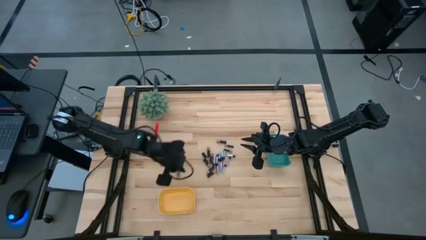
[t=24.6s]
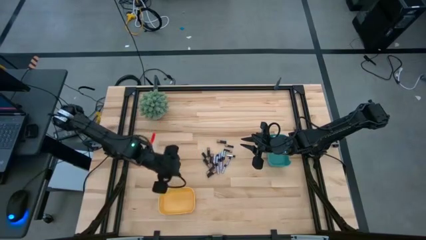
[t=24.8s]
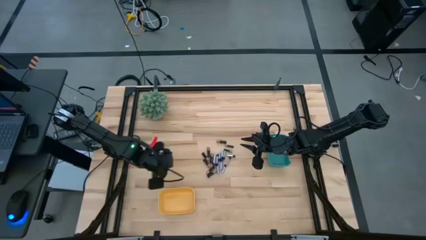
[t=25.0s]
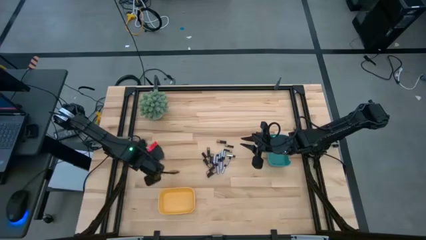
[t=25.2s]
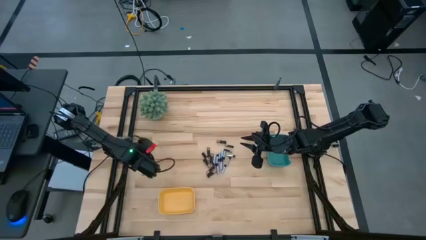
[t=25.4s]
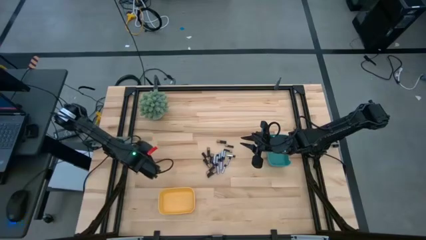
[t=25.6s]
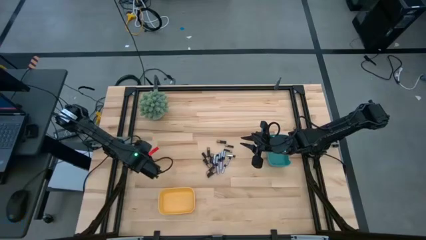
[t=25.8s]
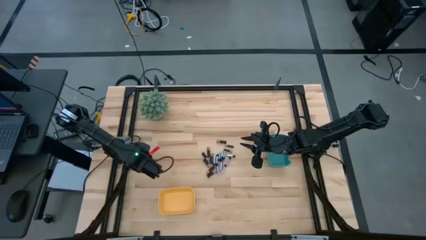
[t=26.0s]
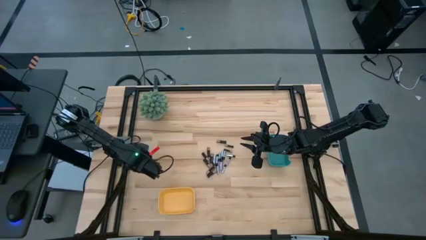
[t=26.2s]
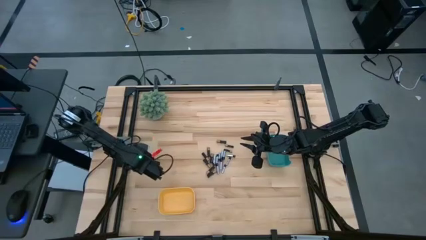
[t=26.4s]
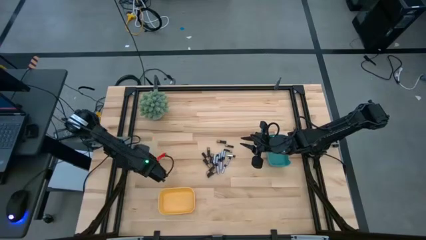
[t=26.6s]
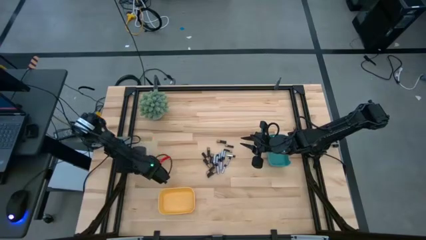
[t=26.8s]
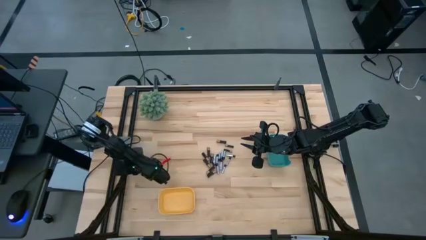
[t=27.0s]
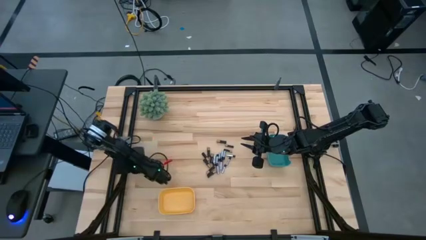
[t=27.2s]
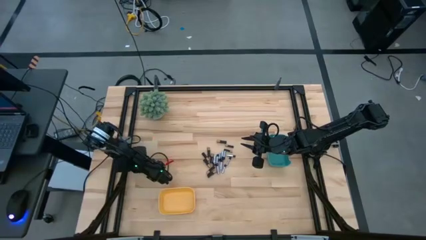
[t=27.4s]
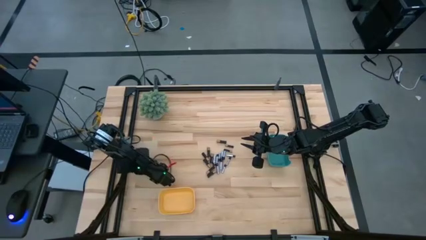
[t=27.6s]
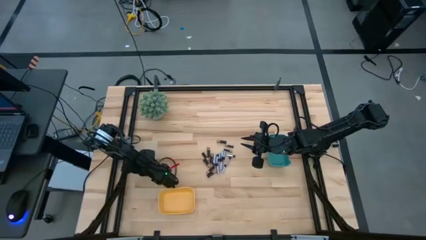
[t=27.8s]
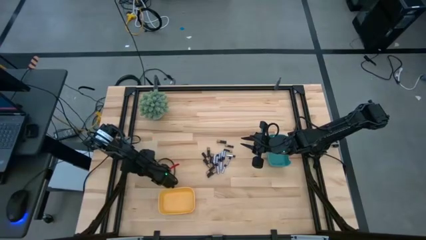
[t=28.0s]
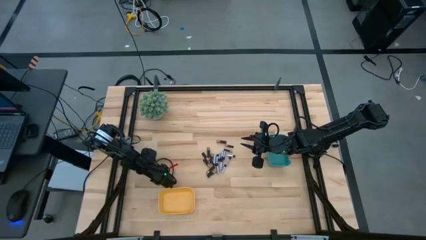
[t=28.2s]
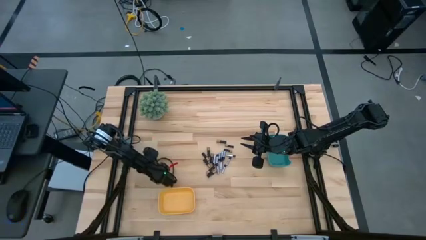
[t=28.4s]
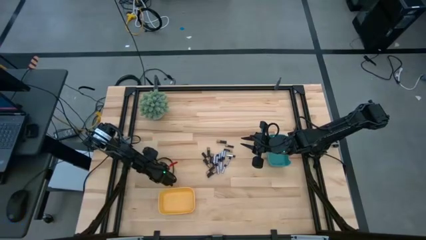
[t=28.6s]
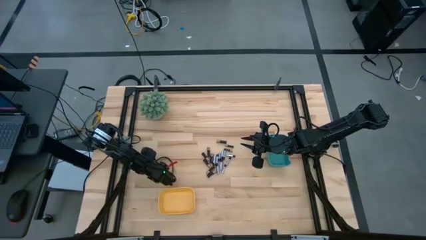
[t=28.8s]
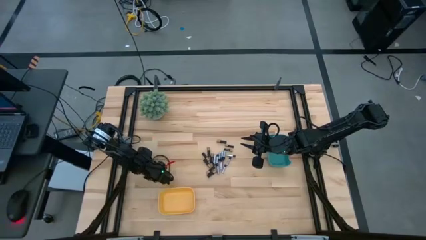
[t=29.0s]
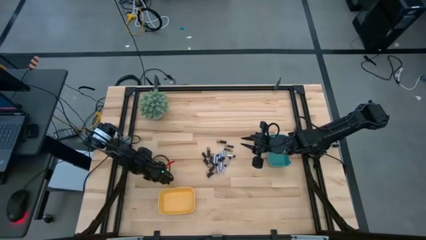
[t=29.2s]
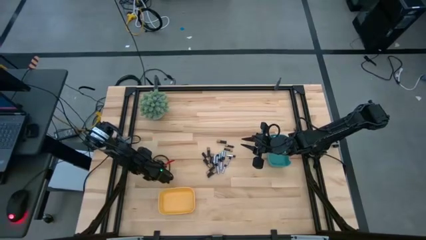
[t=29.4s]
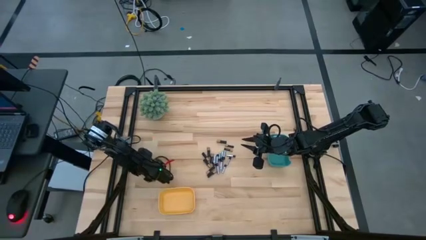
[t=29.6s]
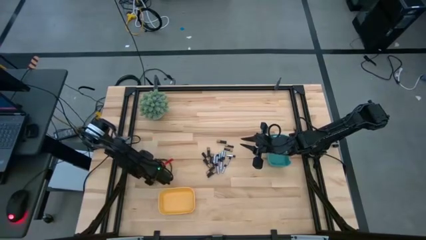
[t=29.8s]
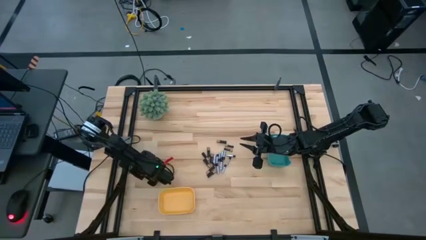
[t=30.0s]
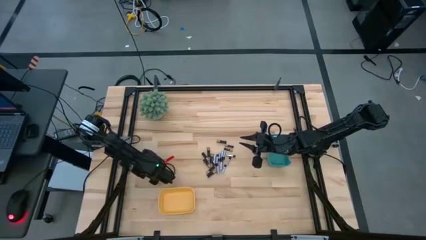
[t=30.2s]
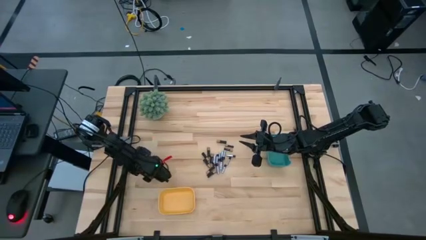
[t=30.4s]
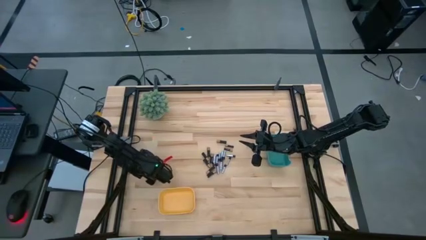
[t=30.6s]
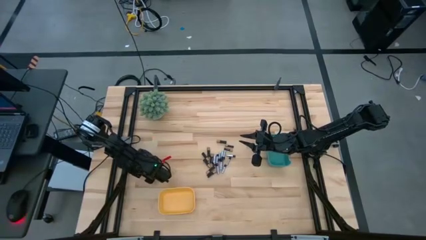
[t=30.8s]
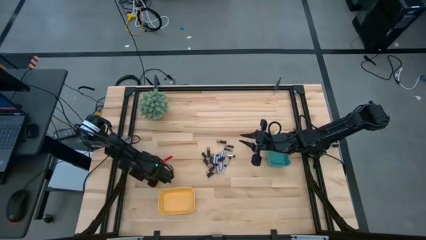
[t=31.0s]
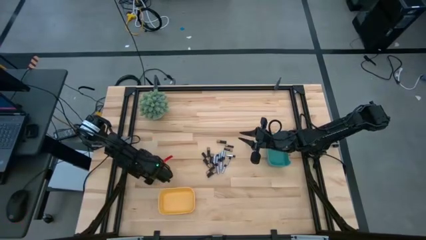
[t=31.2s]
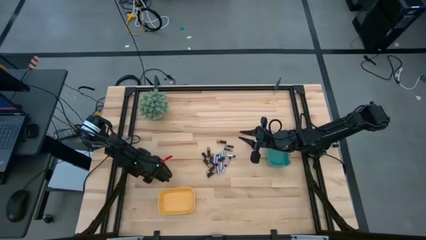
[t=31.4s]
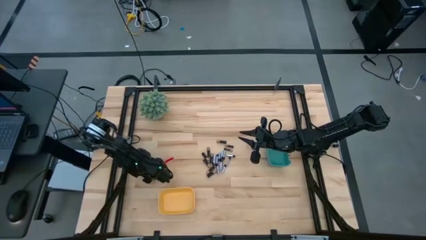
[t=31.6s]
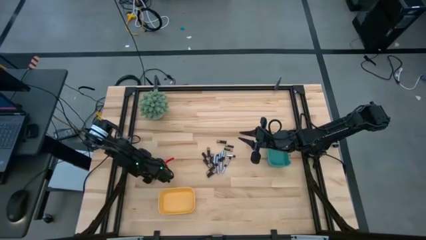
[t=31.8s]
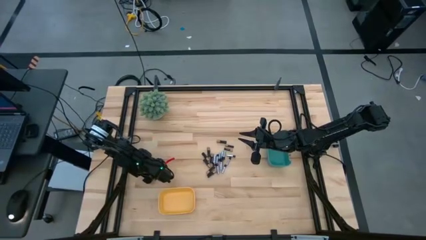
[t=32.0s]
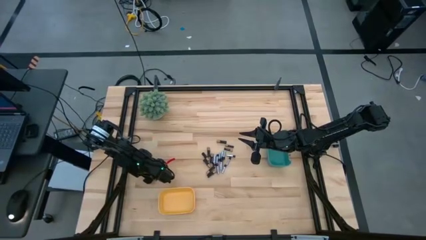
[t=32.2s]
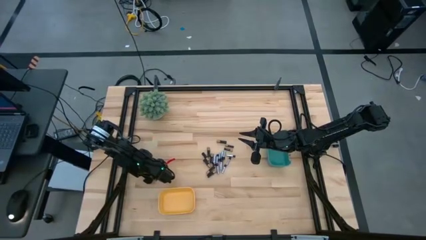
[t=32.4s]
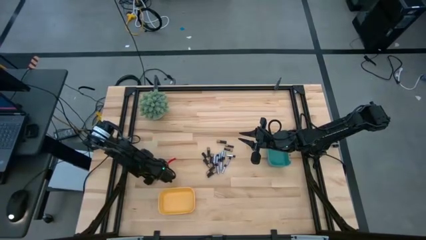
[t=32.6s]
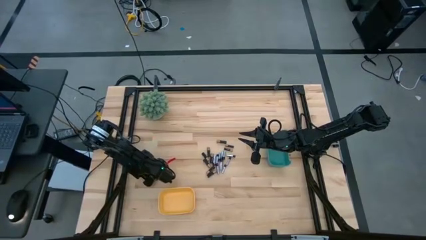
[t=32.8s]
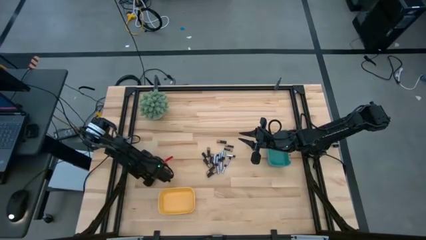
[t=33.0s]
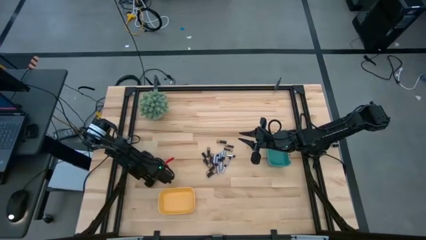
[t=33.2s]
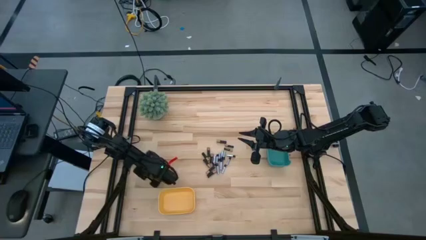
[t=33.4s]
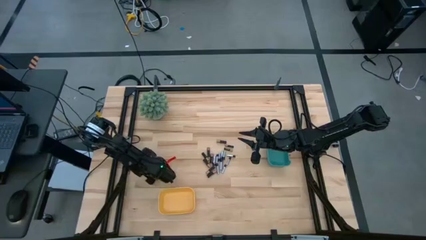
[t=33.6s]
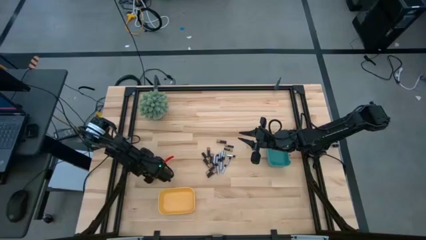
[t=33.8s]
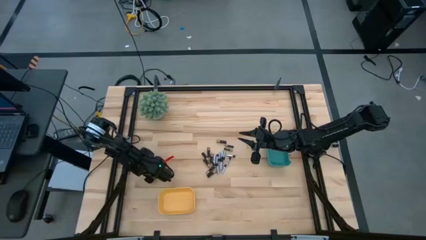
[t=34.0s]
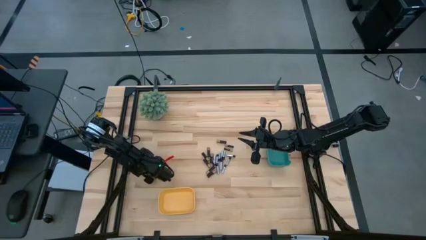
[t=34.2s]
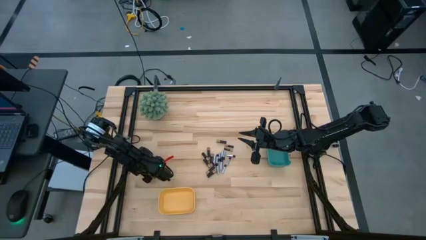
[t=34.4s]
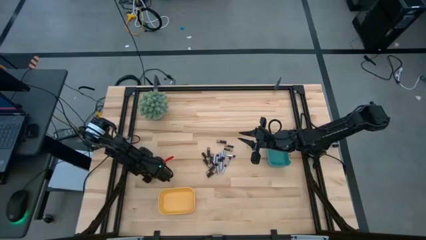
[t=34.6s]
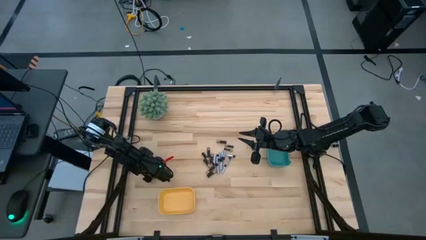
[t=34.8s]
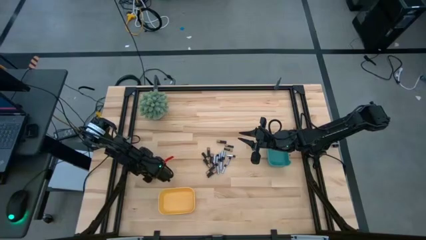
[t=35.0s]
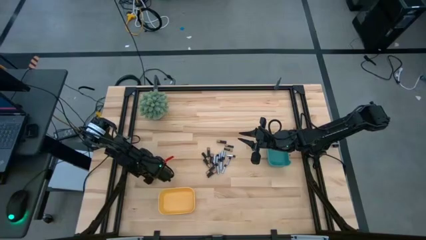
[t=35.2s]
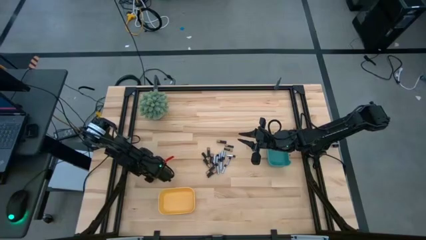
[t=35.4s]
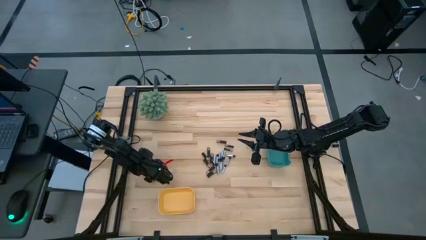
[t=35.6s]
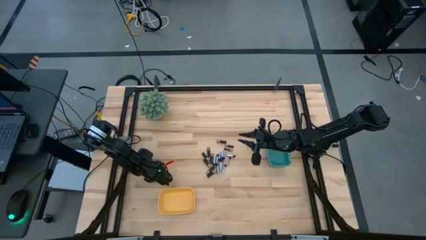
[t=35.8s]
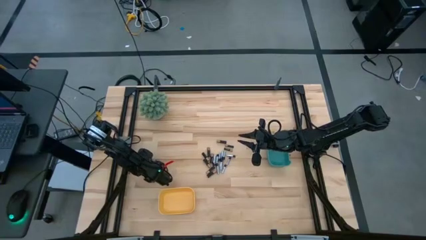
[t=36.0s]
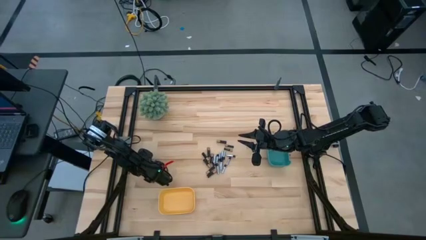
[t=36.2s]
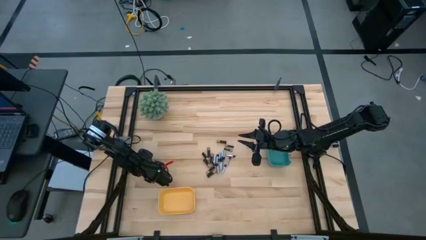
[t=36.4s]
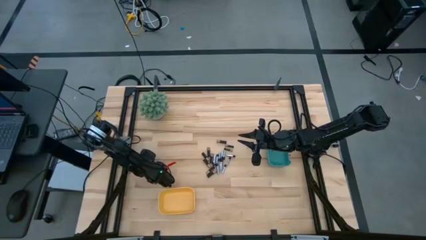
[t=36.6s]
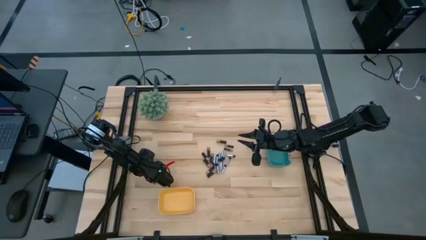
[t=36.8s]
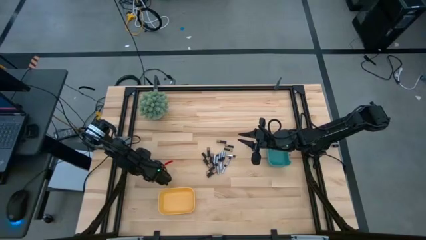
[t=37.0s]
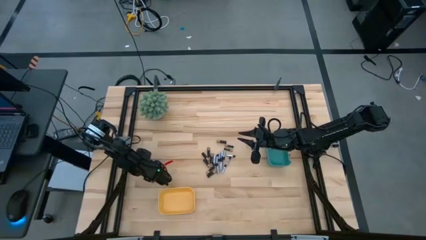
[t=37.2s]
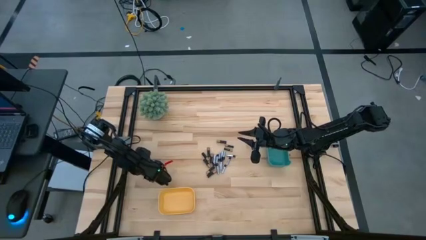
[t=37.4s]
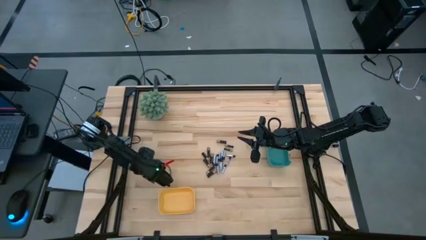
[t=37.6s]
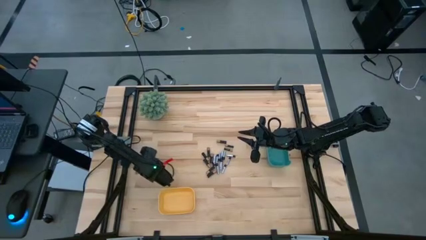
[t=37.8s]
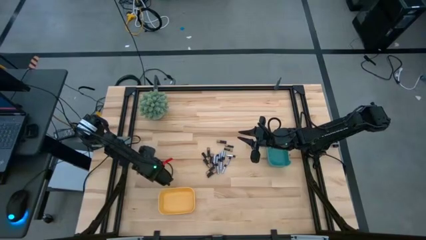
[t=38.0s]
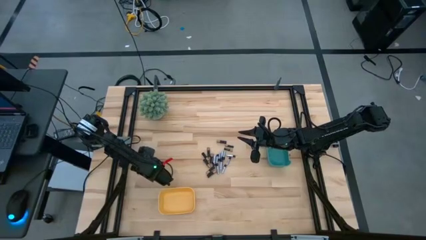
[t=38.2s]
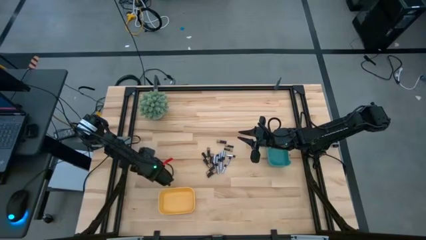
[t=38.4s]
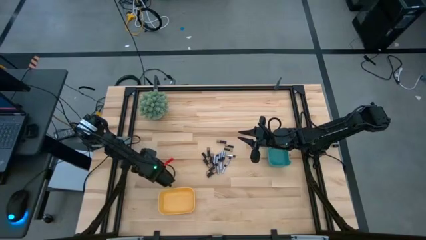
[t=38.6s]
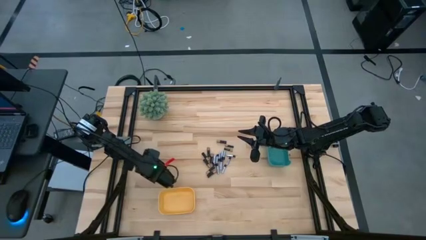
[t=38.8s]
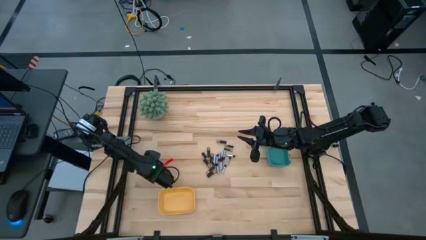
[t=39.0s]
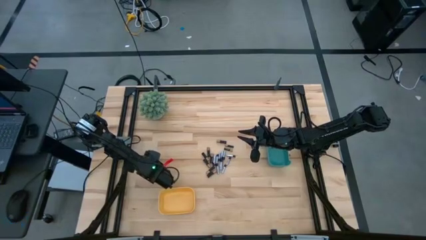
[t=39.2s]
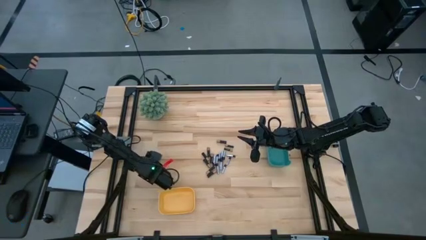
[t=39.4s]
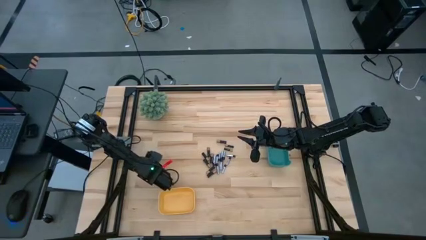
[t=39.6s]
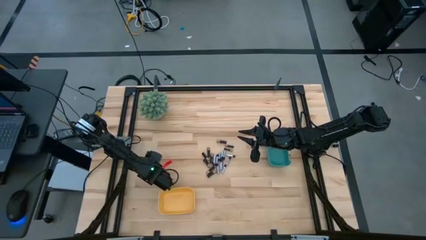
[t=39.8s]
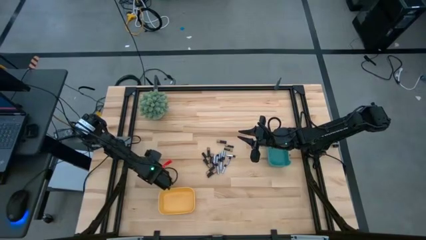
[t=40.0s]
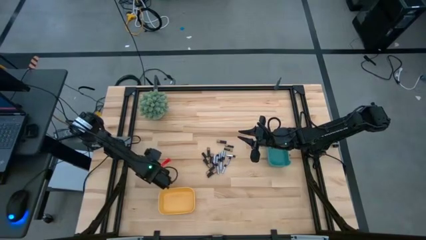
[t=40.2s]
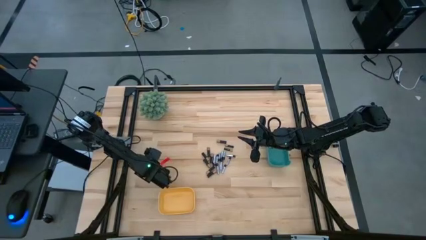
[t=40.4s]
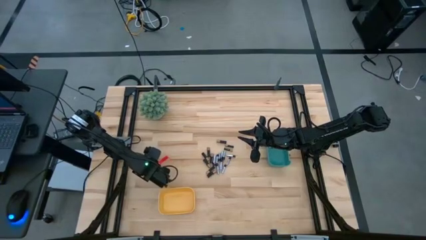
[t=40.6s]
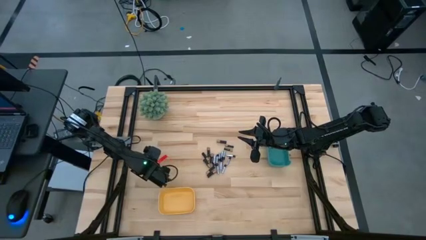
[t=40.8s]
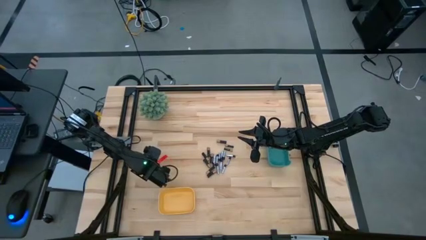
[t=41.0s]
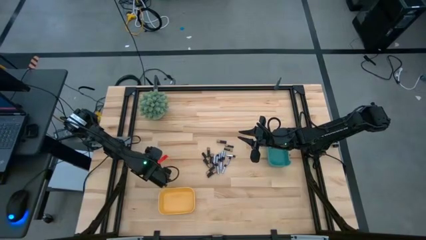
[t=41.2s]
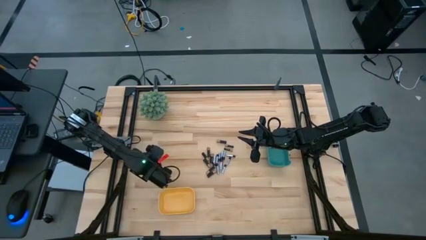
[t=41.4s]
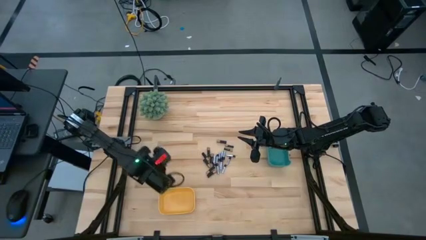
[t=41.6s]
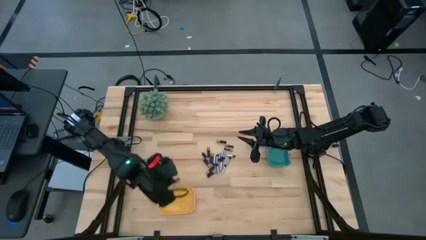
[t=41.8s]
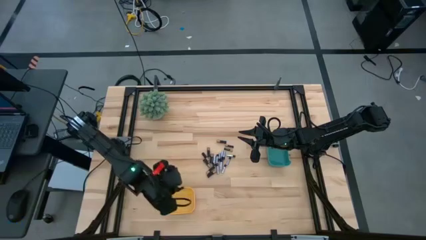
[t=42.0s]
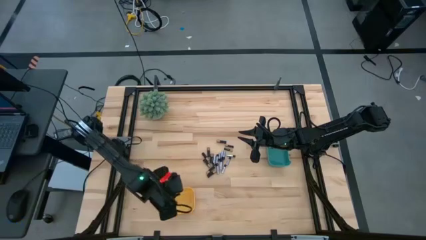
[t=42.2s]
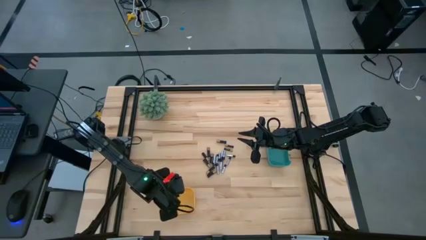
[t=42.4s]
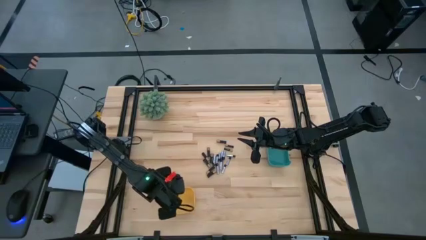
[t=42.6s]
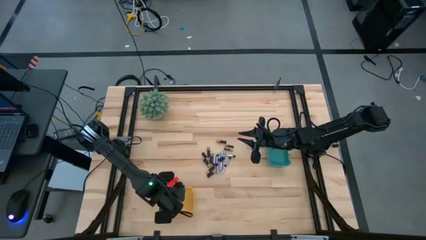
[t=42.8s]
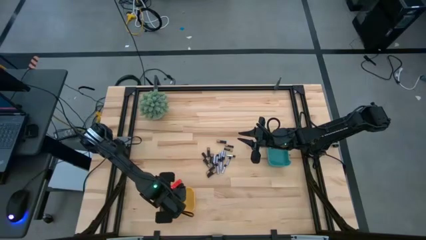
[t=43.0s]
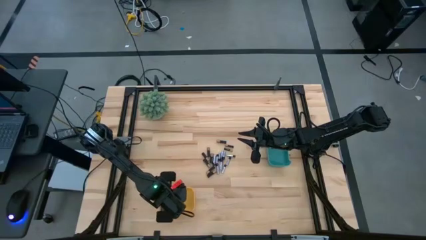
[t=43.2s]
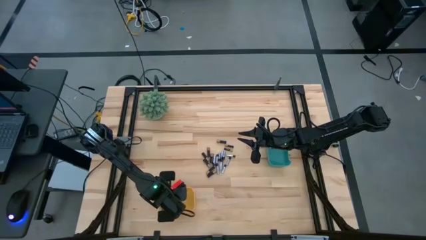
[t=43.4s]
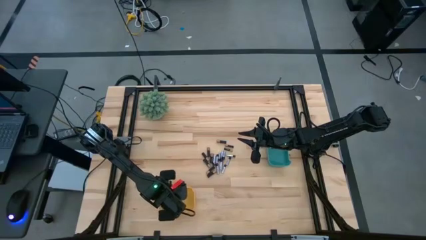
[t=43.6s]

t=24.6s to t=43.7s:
Task: Sort batteries
Put the black battery into the yellow bin
